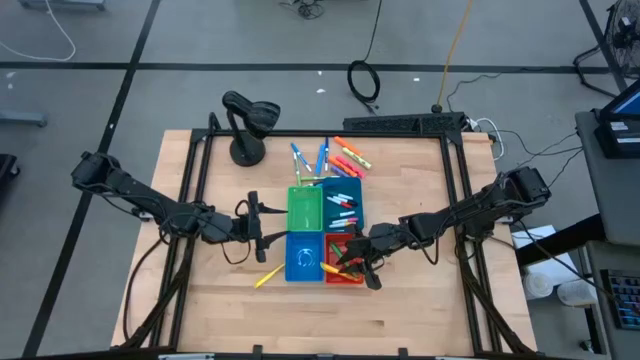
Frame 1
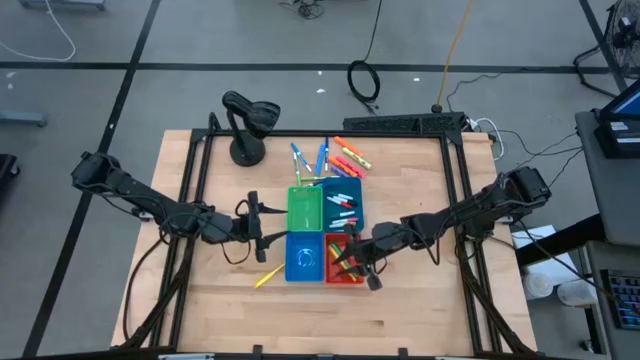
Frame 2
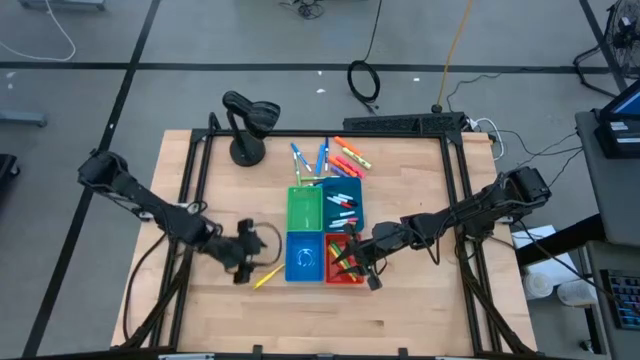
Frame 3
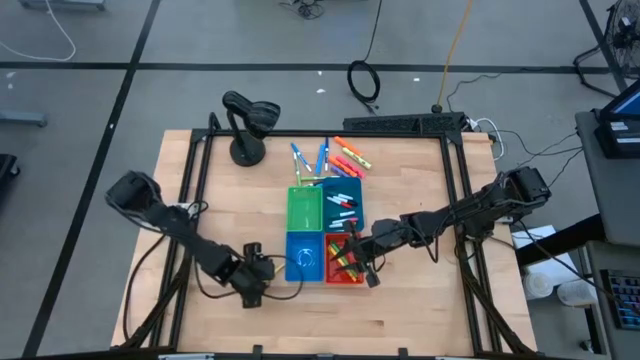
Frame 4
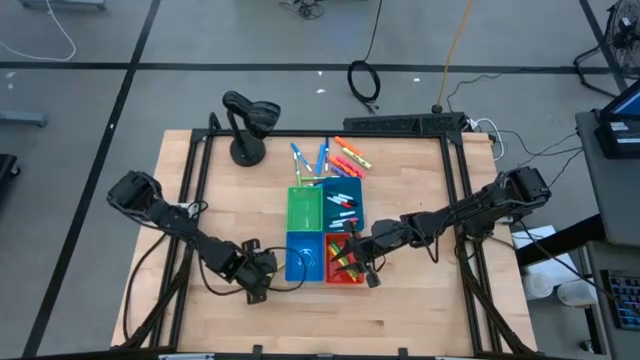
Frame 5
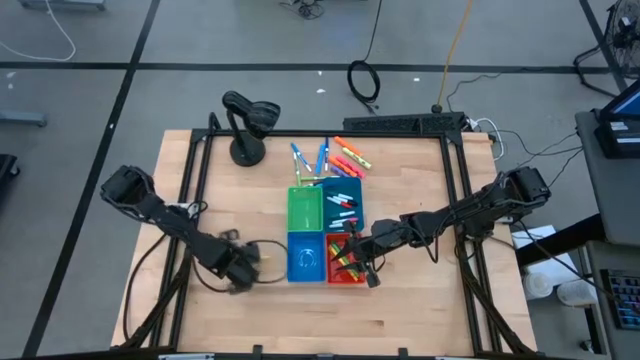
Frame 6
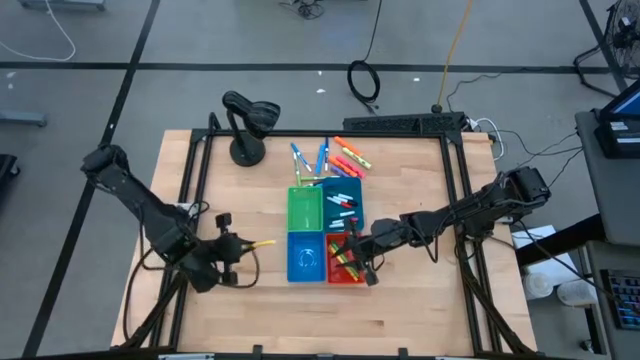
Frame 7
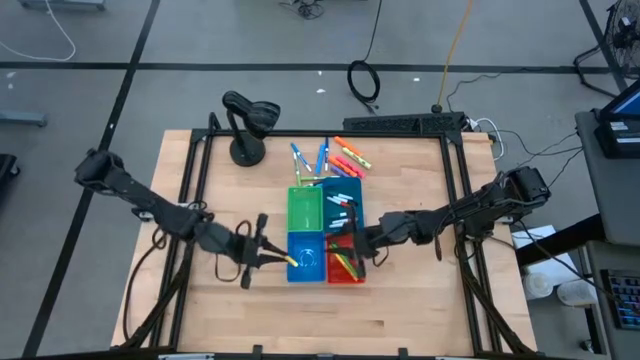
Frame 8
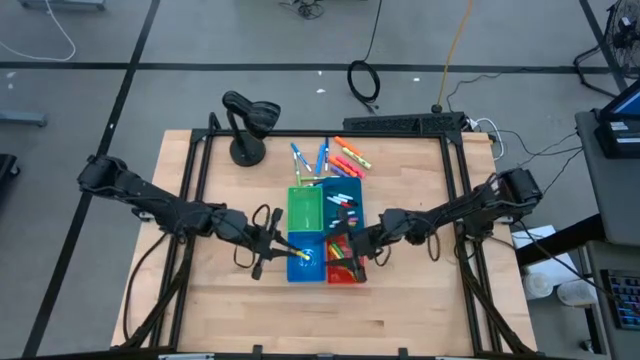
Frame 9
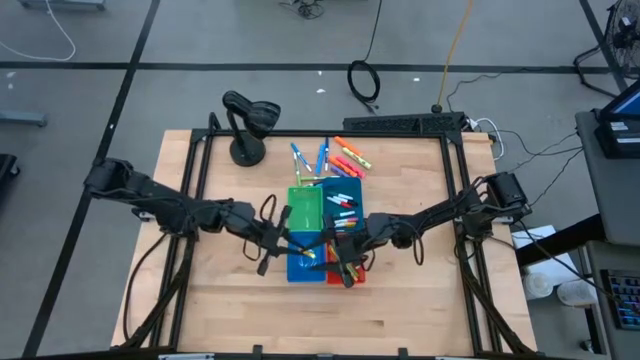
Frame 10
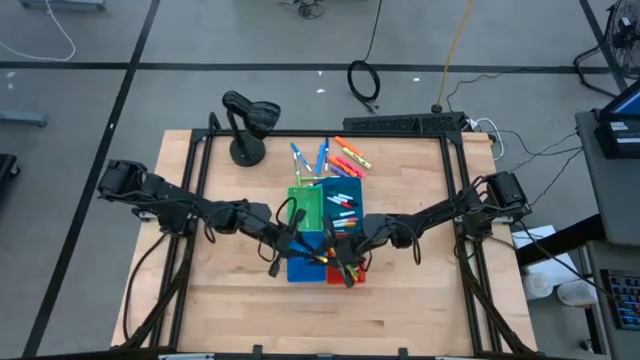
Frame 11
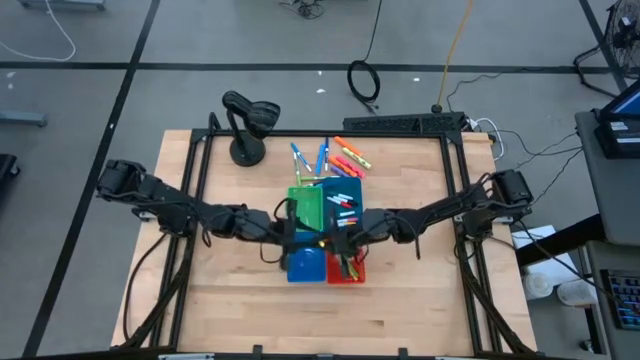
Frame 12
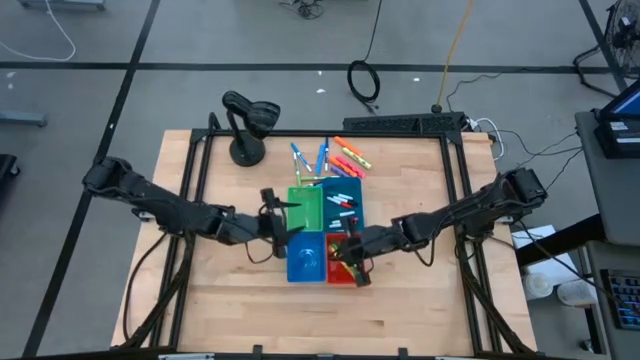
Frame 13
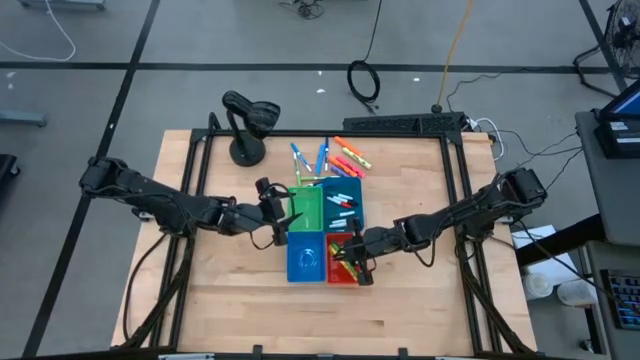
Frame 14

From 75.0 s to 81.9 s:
Task: Pick & Place Markers
Put the yellow pen into the red bin

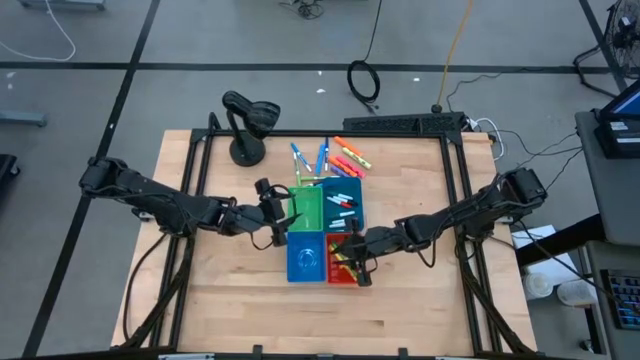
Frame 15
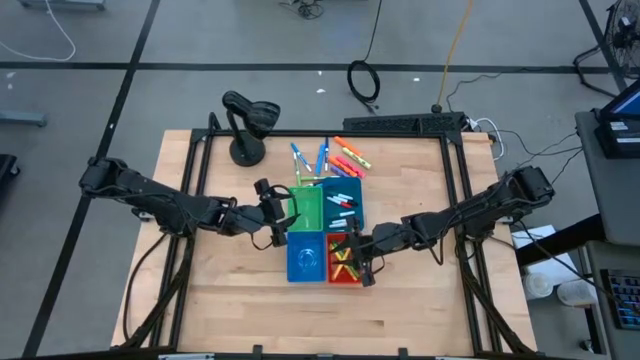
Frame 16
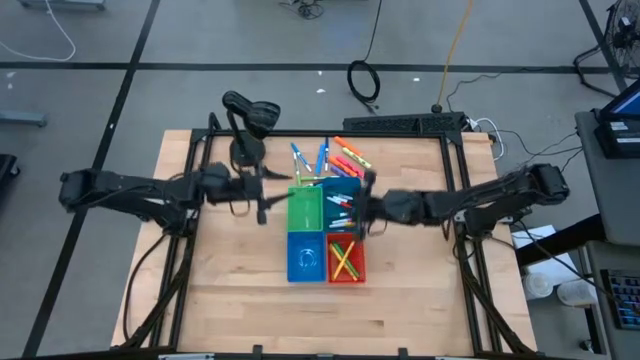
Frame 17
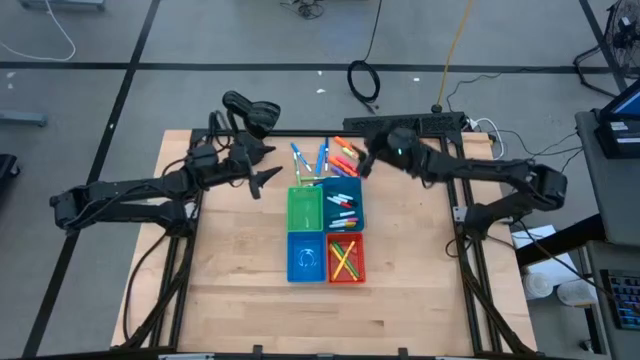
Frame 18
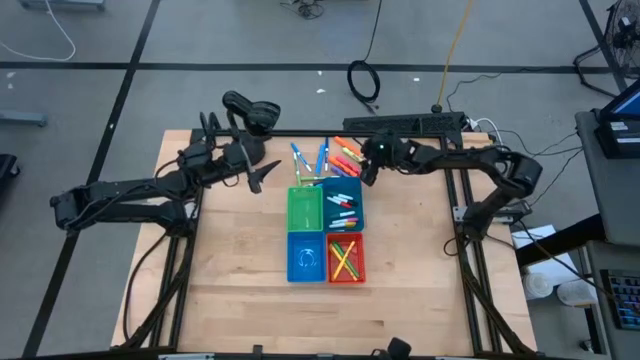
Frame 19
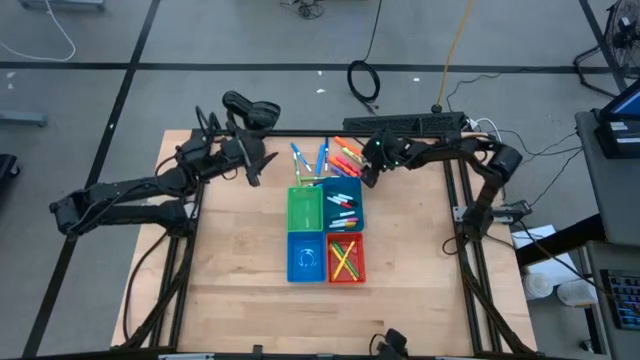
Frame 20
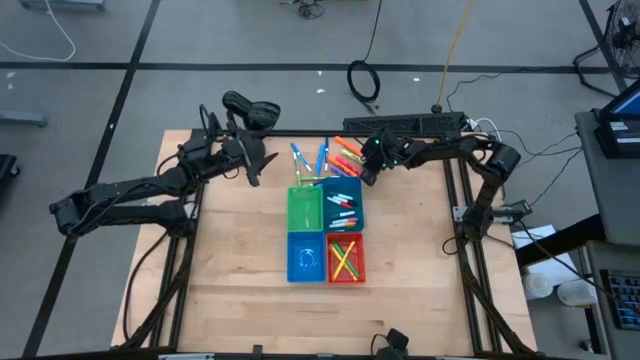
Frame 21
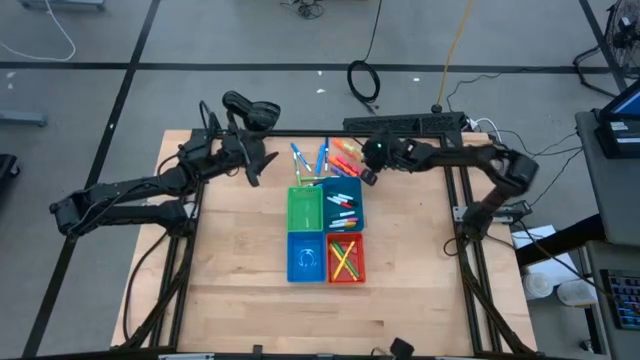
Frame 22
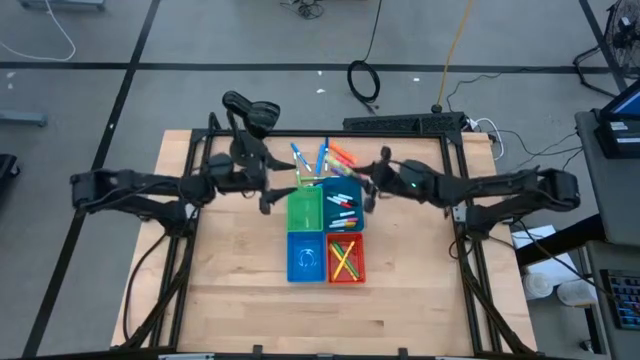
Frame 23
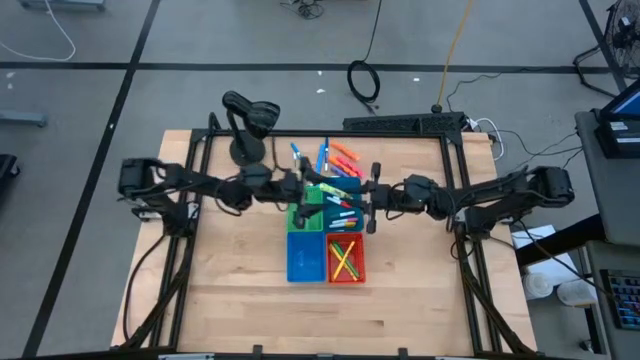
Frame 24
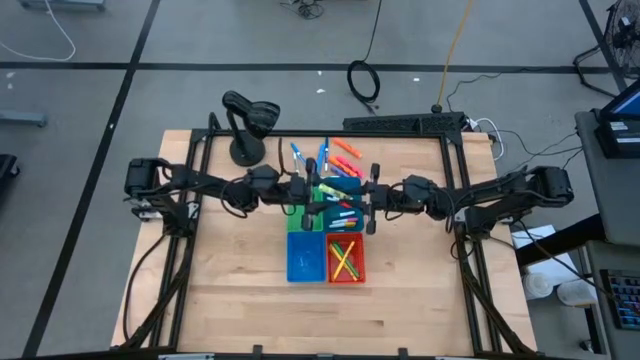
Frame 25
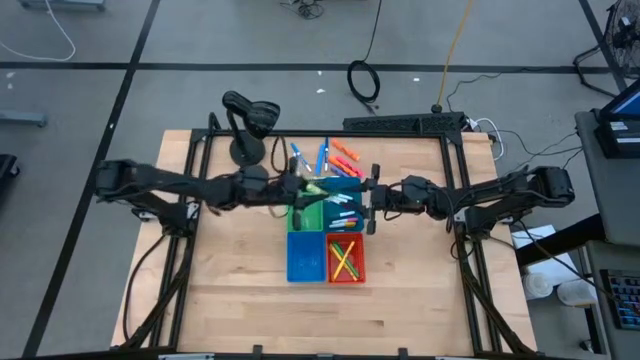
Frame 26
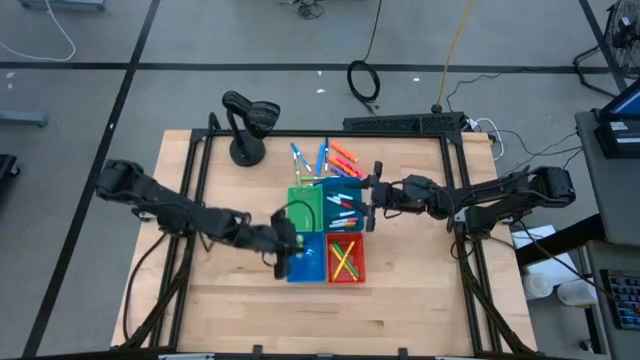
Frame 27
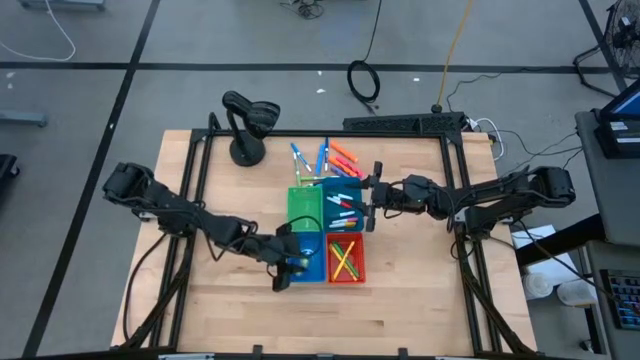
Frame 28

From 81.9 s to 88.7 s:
Put the green highlighter pen into the blue bin

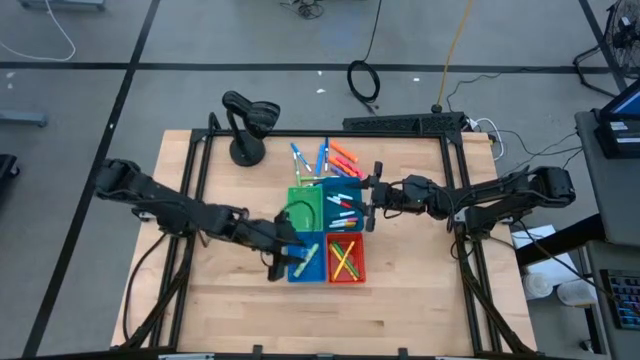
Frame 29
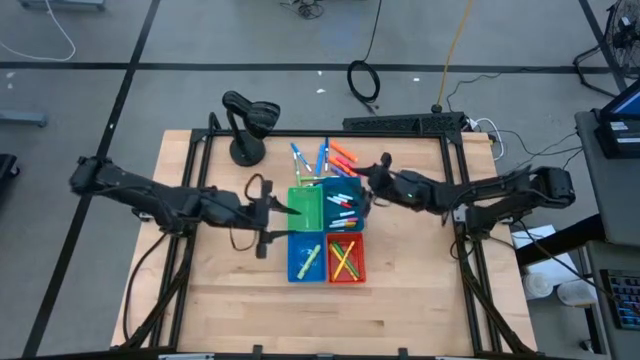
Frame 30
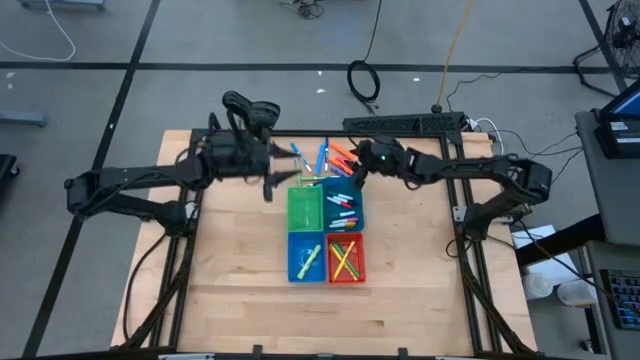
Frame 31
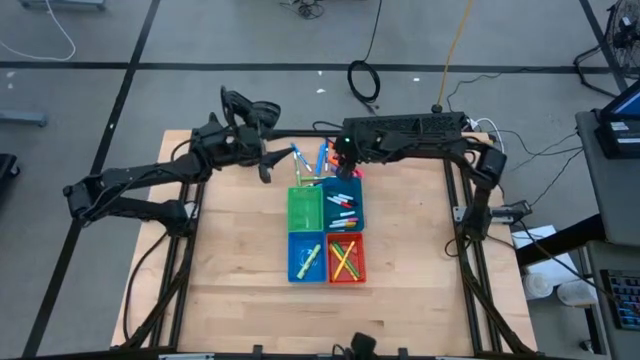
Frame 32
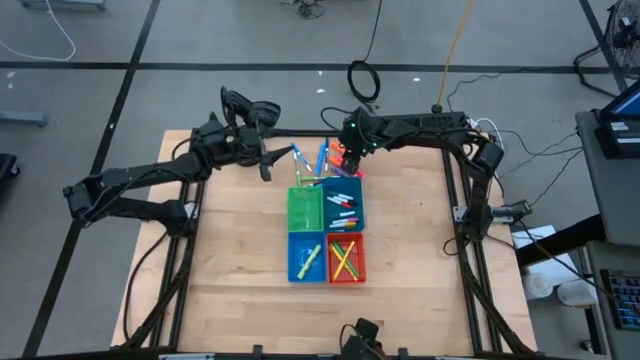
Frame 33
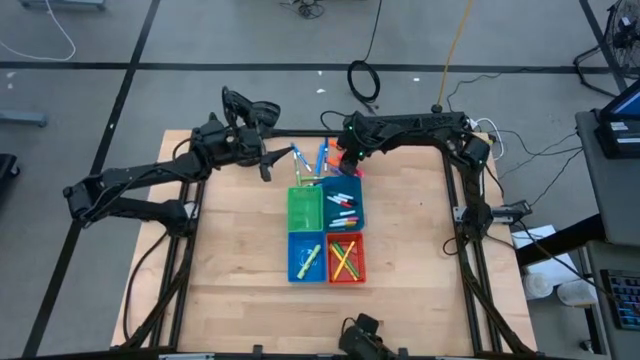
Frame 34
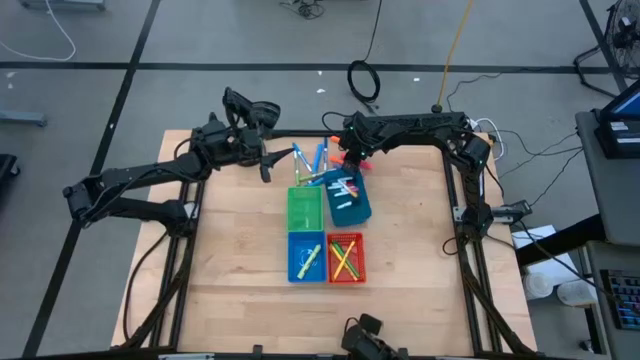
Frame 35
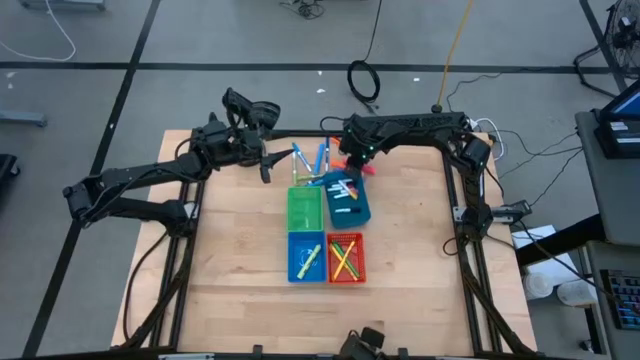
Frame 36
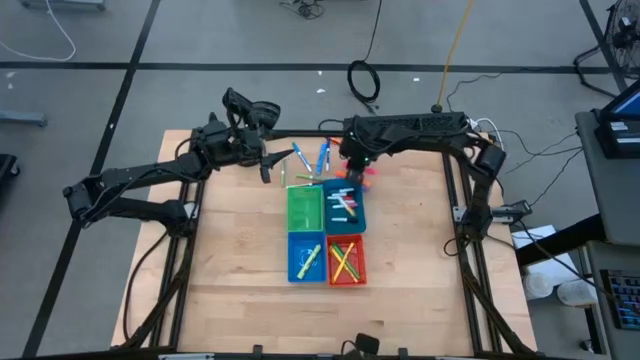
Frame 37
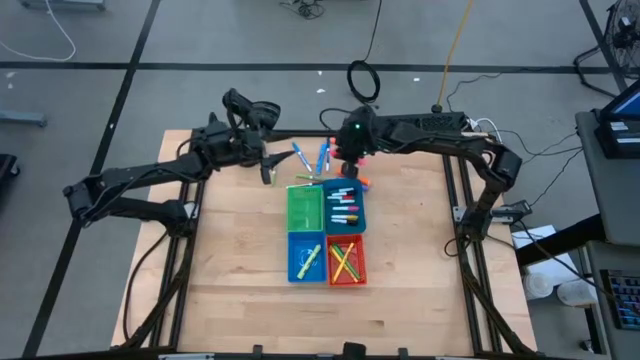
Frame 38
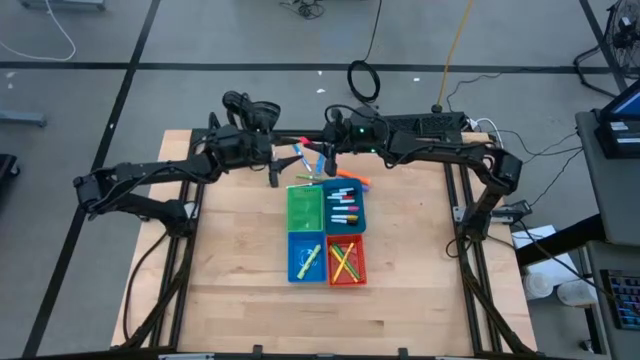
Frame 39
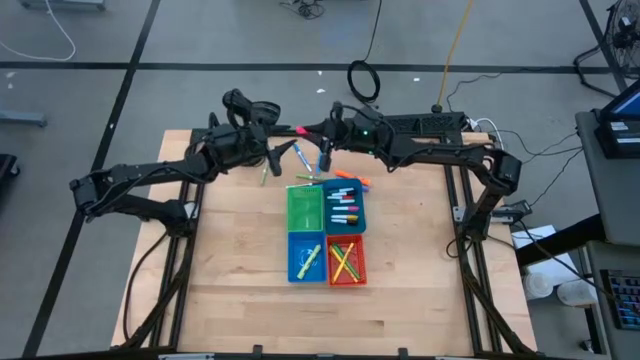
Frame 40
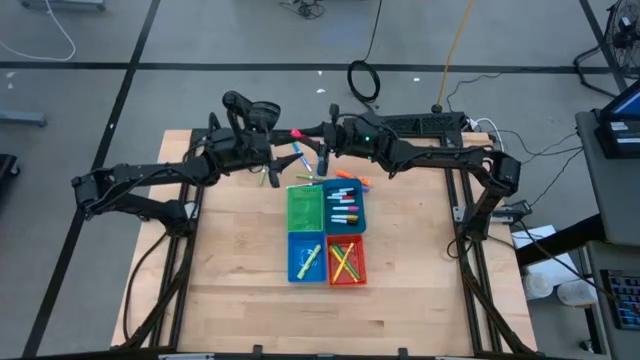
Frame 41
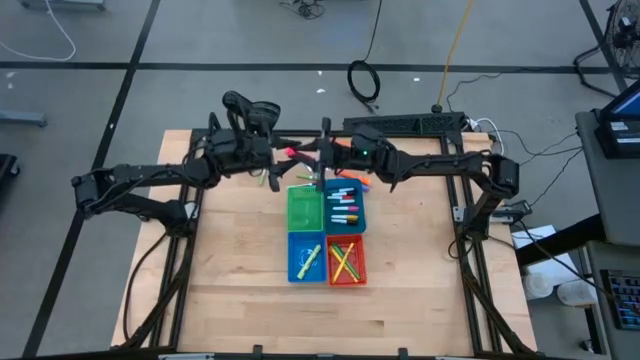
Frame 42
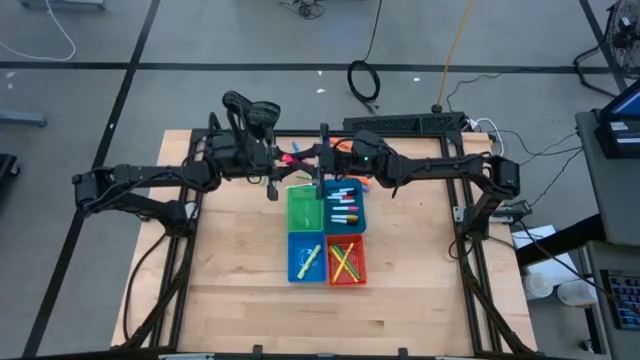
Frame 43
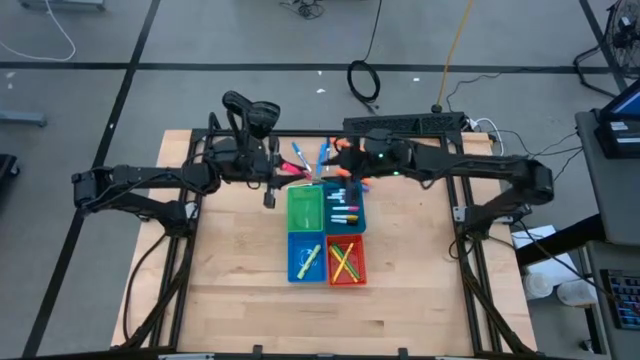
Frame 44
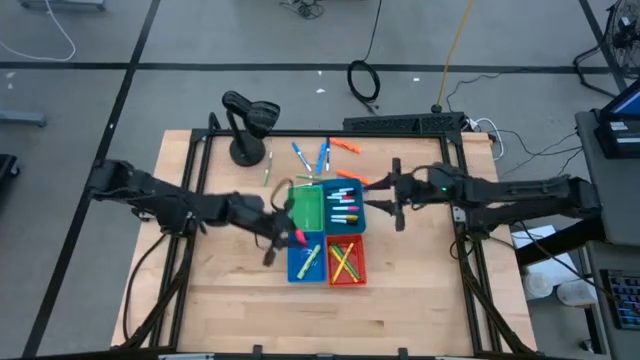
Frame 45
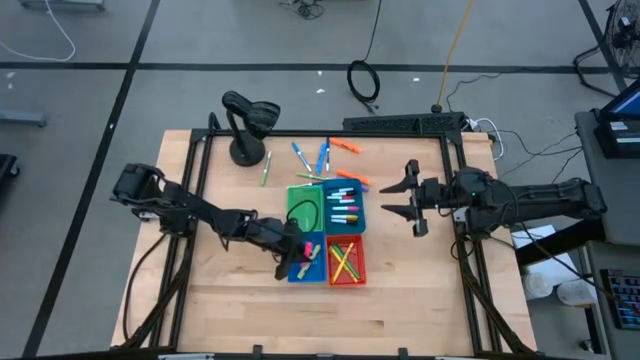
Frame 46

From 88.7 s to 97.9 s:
Put the pink highlighter pen into the blue bin
